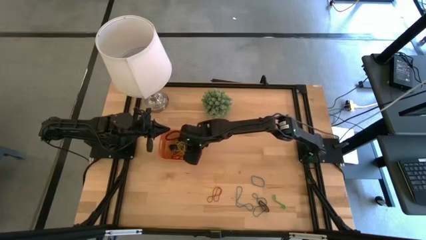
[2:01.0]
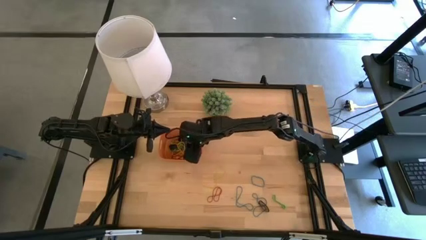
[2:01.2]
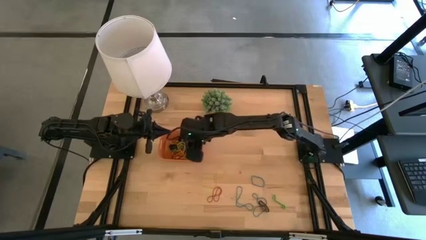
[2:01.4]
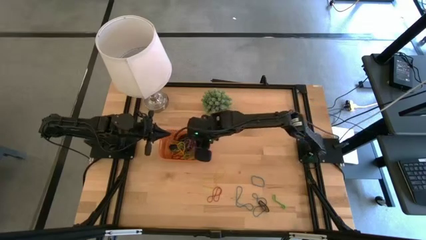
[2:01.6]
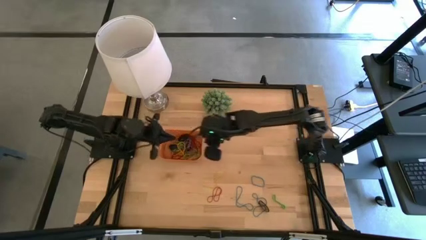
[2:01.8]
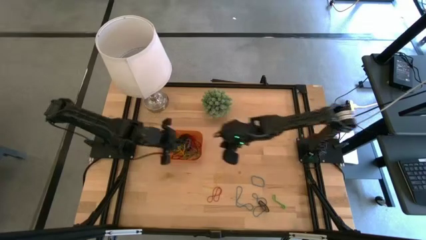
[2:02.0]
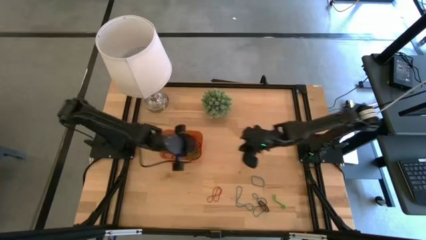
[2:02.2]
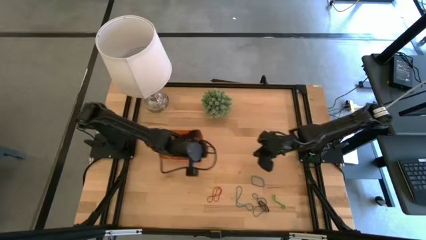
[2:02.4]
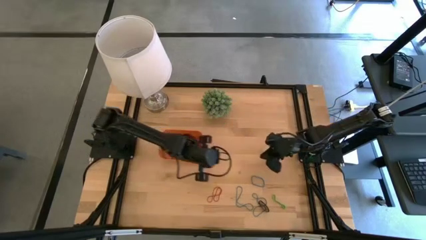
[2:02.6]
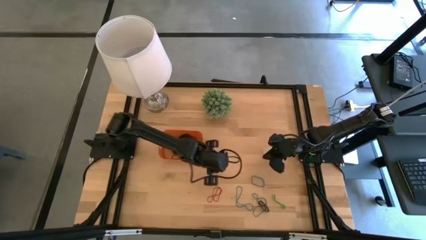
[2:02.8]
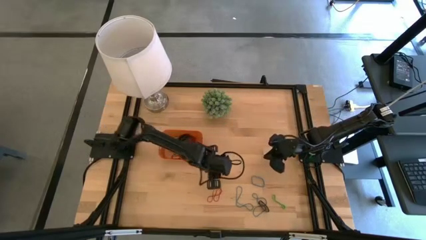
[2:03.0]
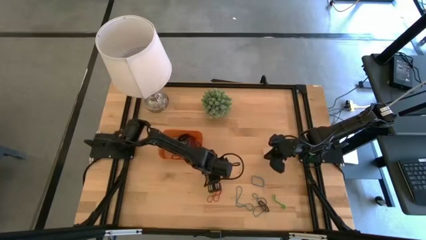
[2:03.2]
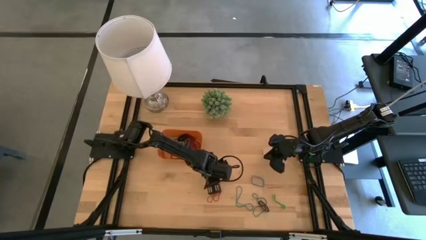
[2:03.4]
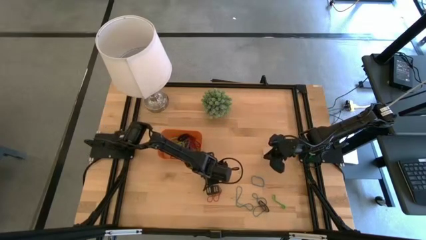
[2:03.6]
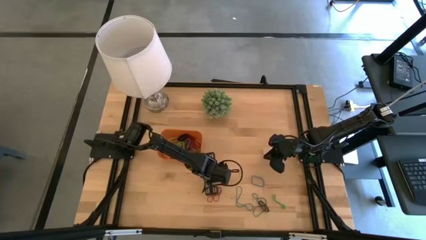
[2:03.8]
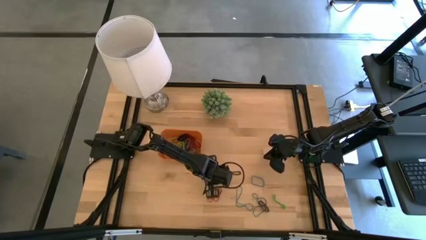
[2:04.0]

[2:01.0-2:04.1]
Task: Pick and place rubber bands into bin
Put the yellow rubber band into the orange bin

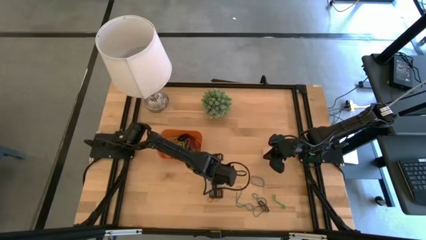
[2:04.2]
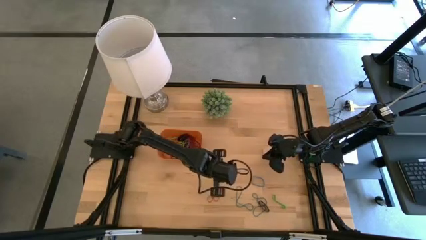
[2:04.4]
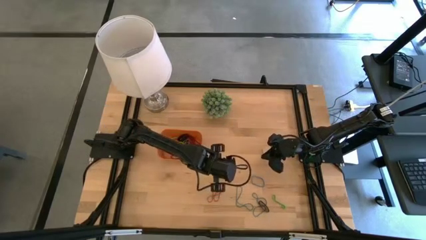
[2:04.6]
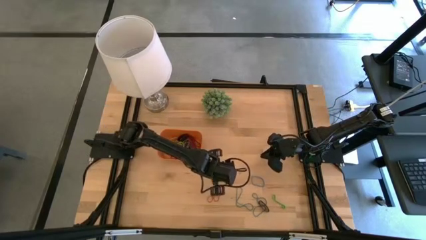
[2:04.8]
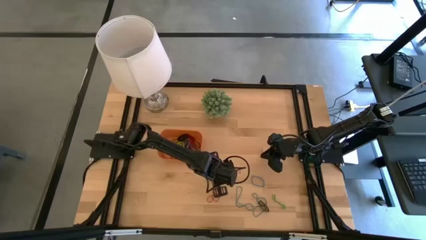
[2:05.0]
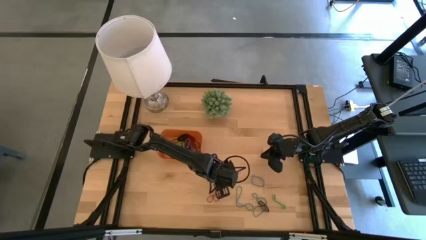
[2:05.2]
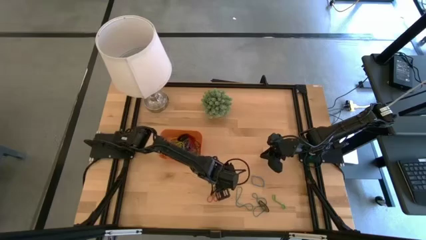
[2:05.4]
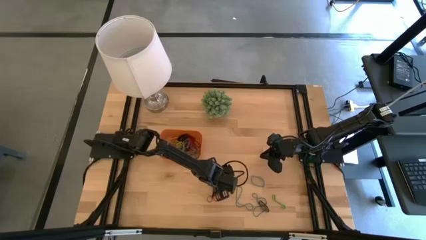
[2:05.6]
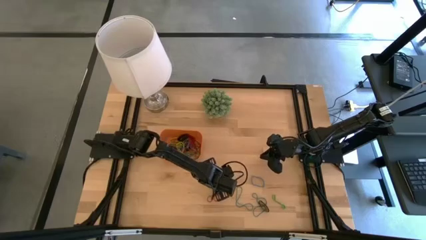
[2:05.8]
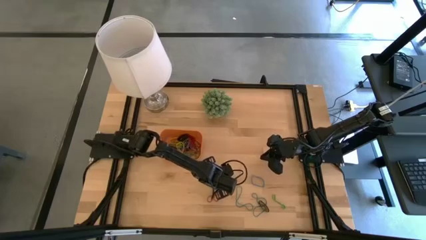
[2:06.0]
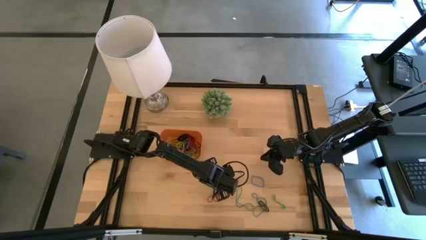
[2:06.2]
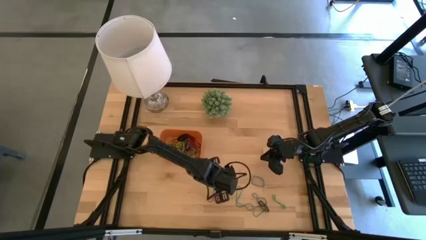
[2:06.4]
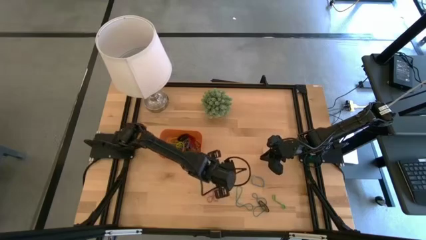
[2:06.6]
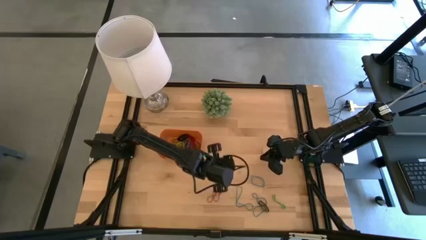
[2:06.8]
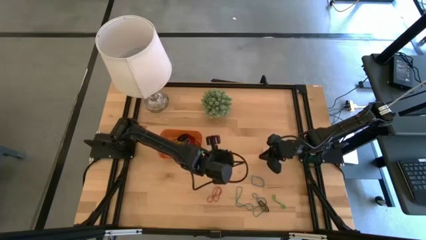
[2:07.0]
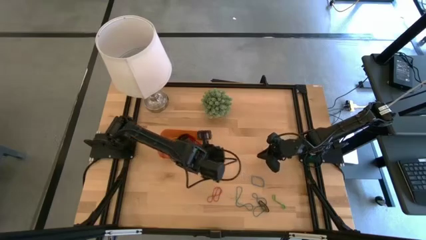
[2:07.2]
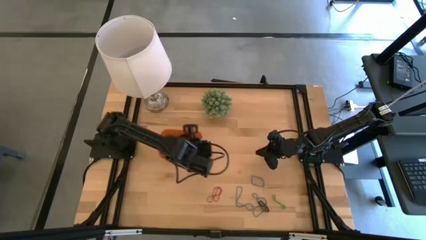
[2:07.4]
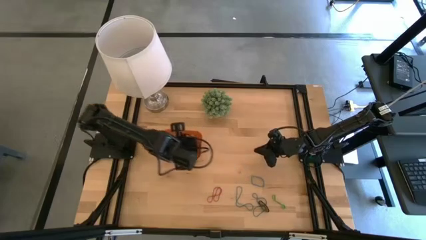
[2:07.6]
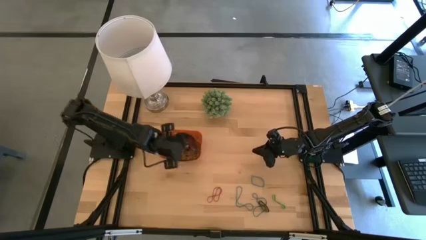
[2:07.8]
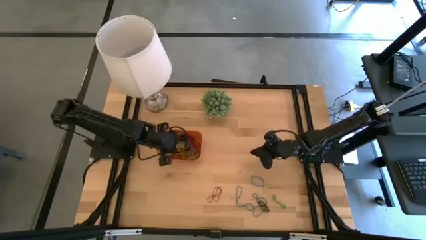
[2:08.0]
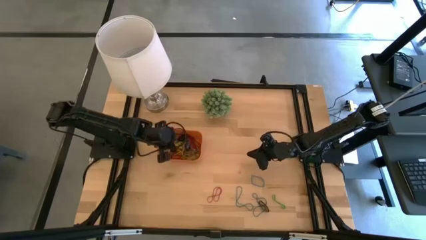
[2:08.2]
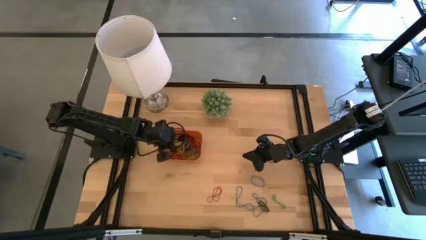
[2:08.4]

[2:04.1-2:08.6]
Put the yellow rubber band into the orange bin

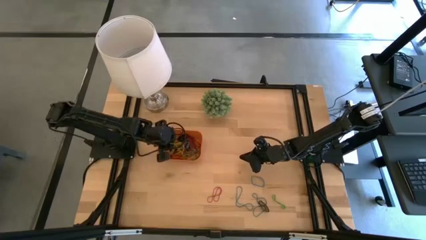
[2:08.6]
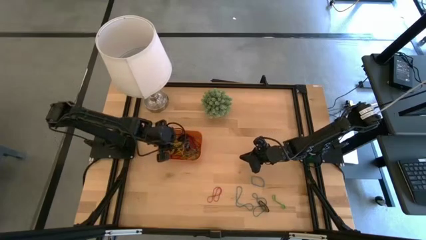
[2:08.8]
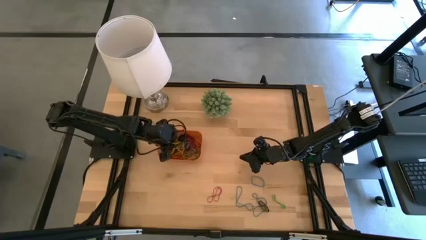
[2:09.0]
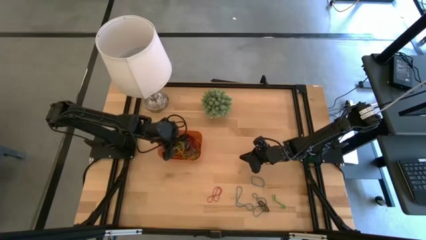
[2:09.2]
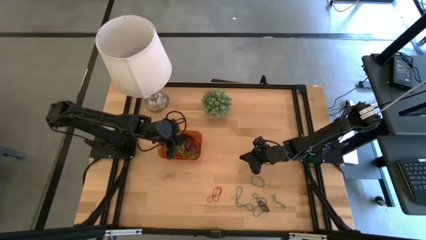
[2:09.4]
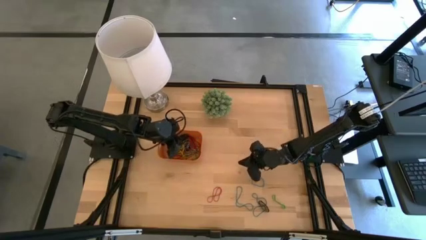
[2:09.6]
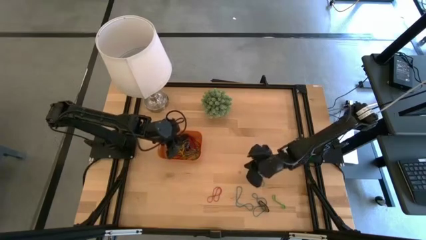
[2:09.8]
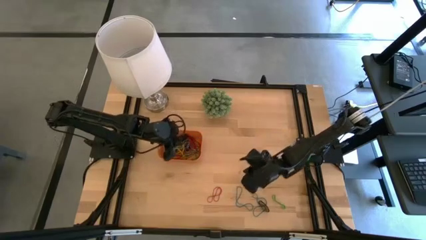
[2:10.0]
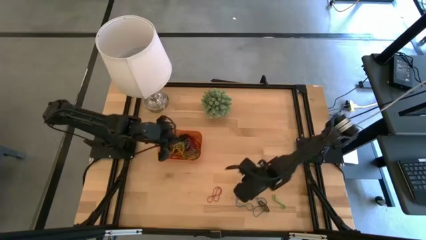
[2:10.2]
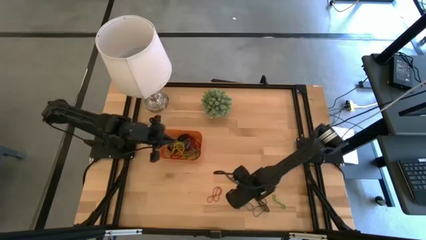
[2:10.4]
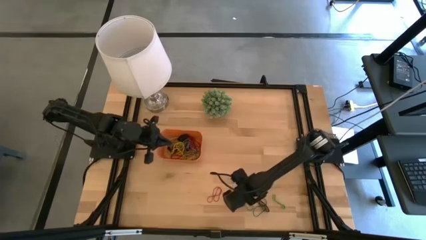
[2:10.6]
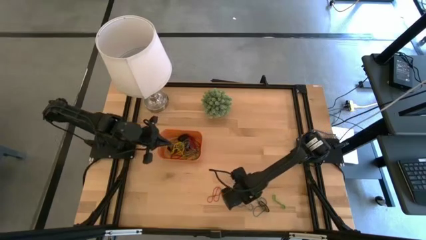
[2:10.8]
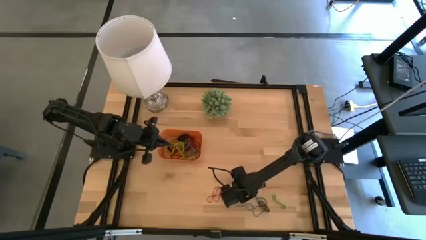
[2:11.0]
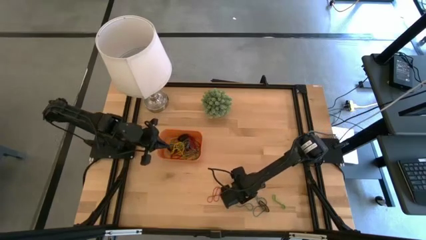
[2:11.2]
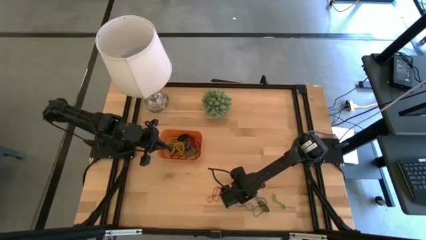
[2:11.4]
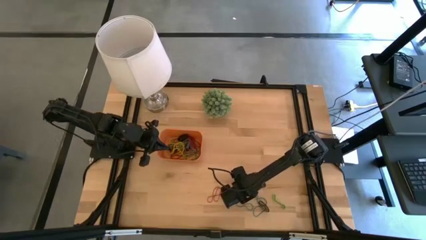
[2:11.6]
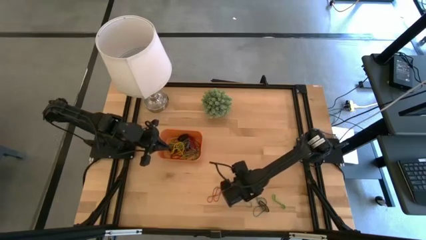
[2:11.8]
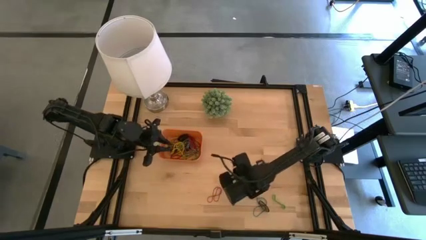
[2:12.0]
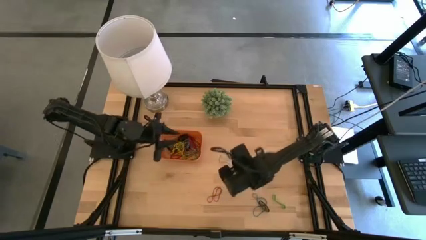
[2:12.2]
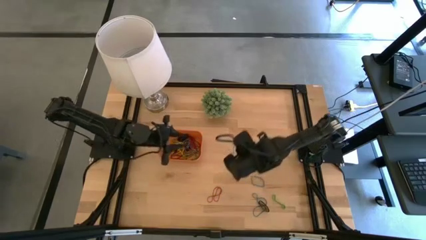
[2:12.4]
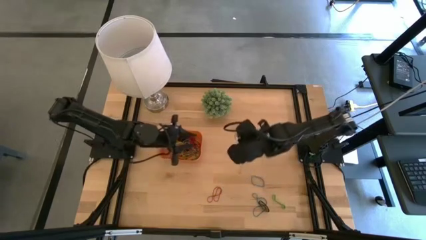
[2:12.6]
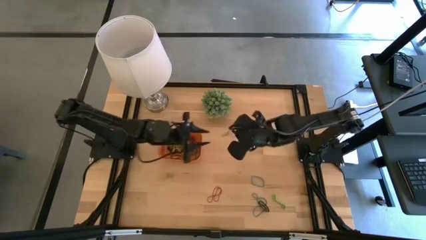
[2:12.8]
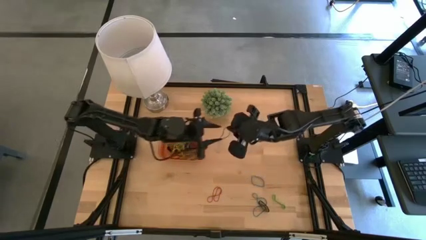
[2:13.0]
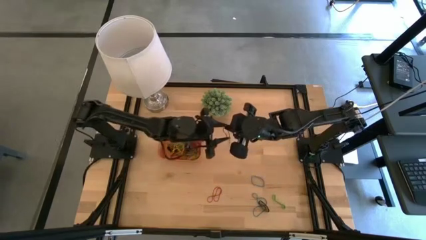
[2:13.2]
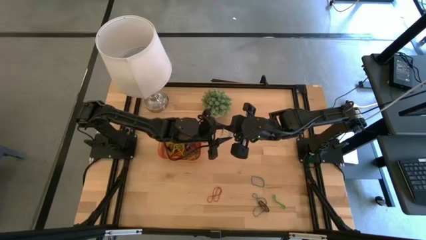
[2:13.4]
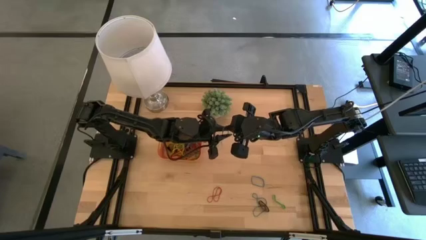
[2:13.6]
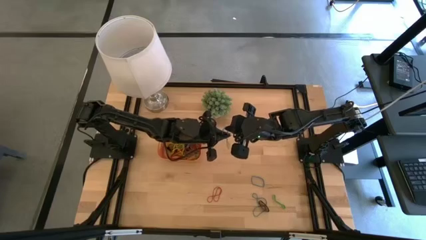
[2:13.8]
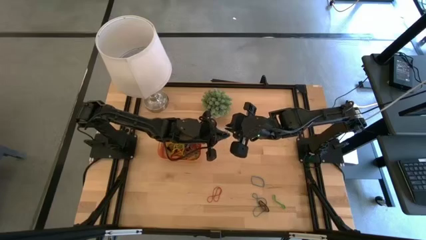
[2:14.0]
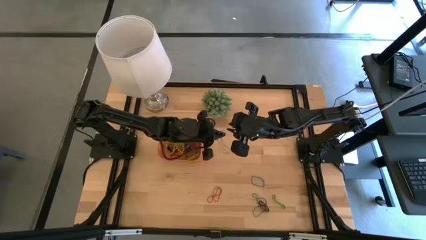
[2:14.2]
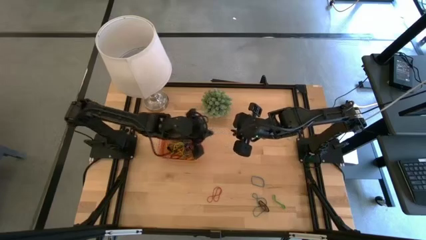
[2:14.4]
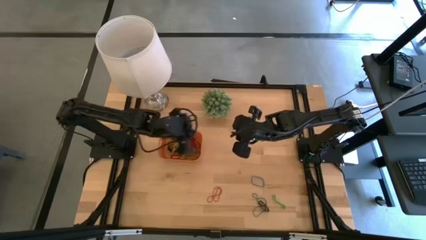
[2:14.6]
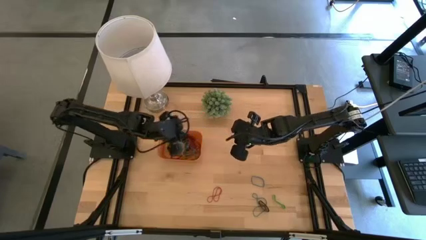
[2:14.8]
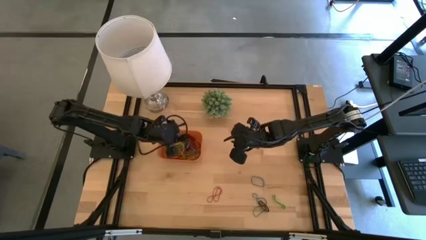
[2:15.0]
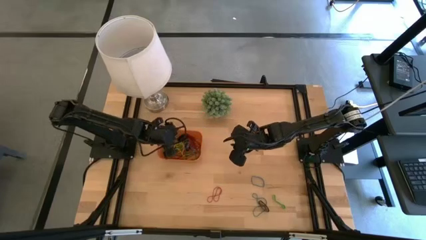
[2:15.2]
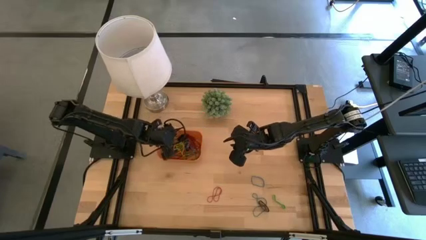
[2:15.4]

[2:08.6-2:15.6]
Put the blue rubber band into the orange bin
